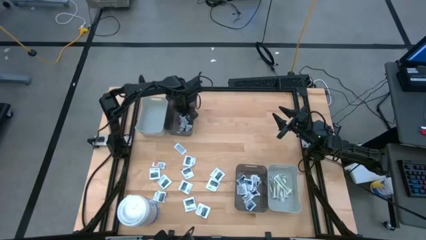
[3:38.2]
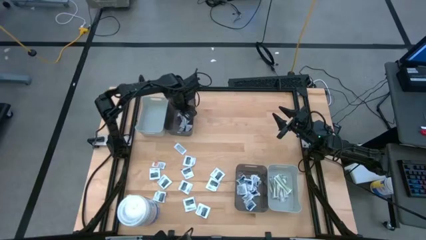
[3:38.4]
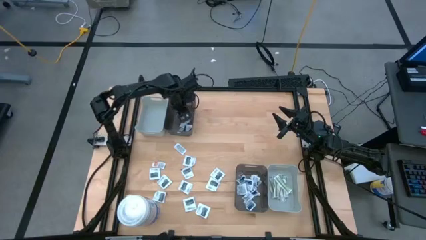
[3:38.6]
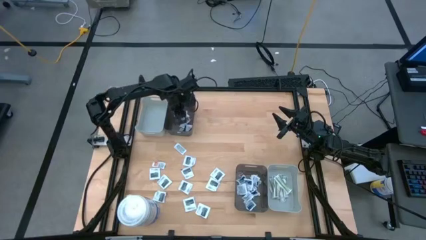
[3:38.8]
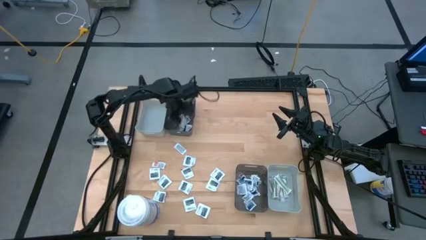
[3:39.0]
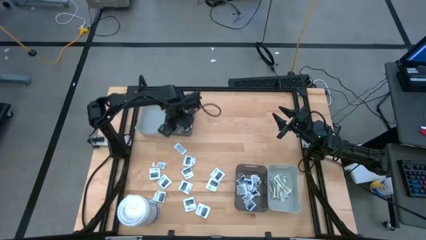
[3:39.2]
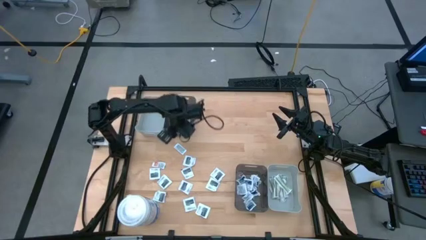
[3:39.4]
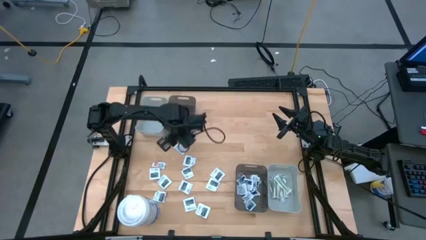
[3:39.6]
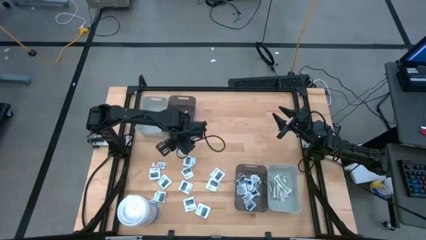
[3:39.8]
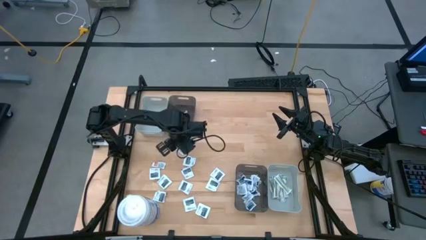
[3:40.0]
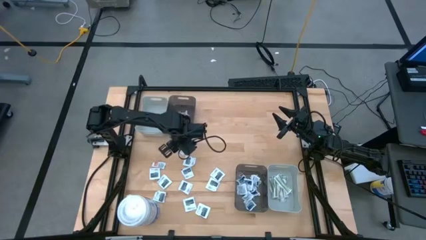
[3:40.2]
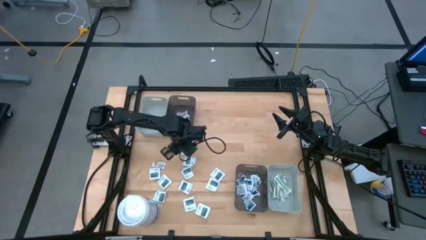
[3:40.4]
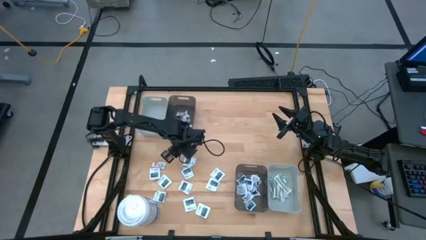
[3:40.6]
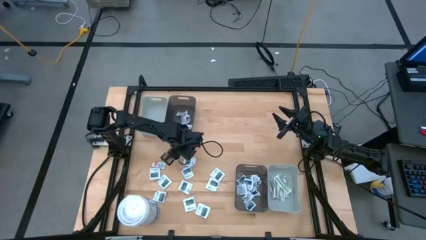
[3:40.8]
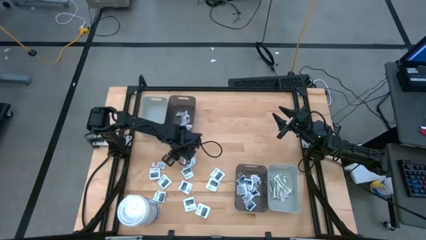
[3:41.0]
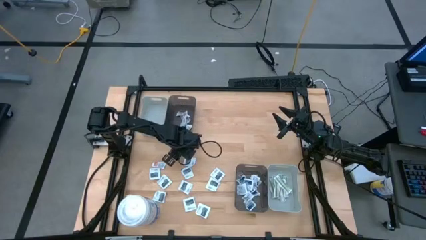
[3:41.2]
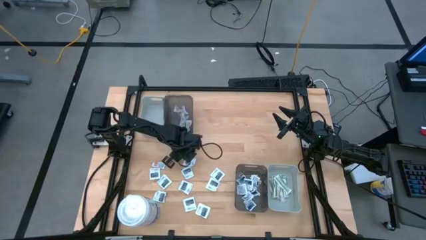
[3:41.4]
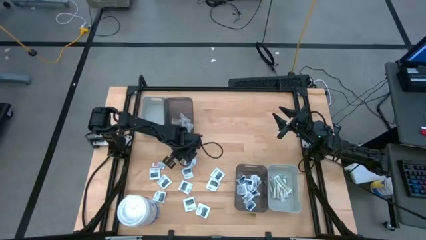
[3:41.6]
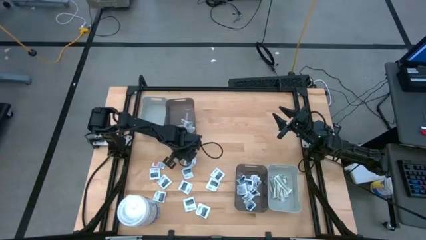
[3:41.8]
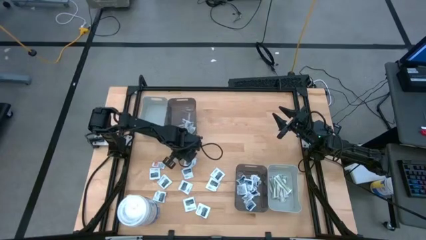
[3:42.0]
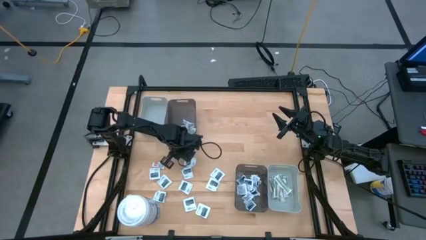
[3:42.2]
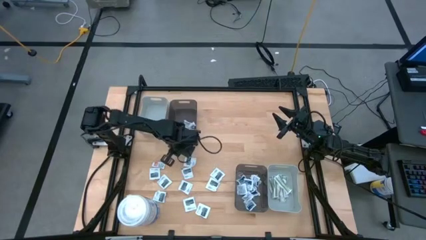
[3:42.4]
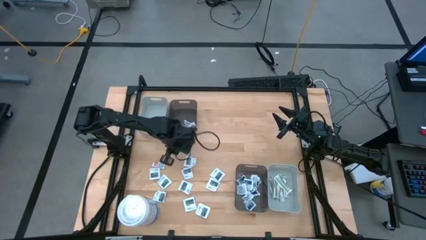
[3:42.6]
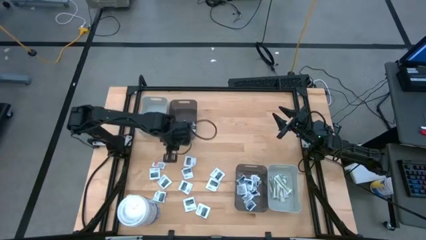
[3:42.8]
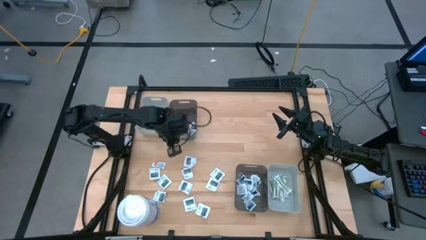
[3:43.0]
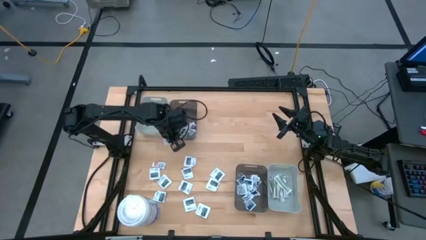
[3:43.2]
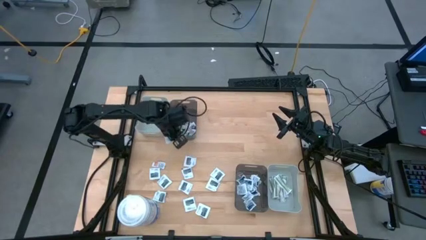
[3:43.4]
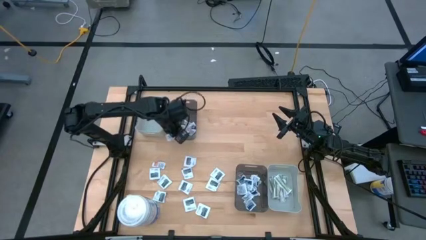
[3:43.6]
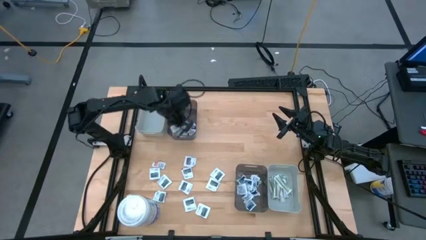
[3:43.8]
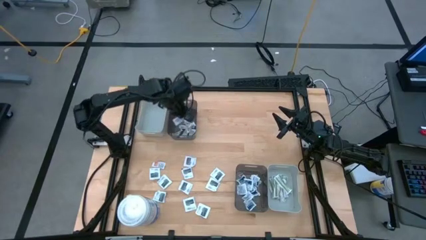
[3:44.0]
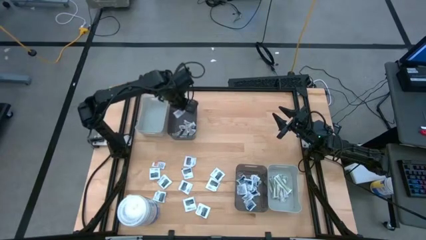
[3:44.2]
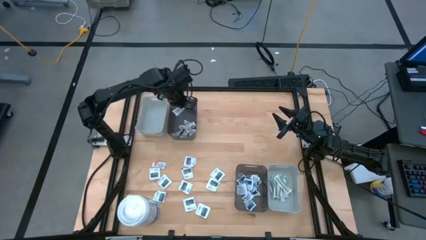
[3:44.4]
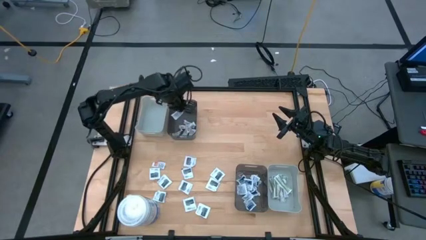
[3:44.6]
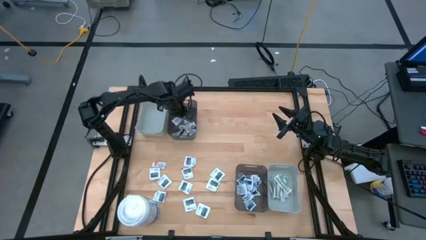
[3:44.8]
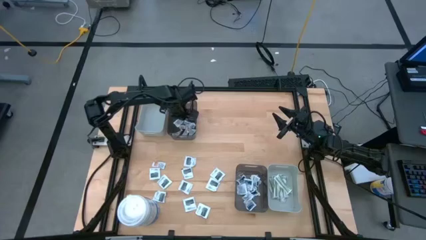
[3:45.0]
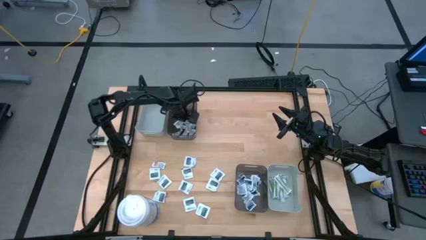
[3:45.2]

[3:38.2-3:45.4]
Task: Pick & Place First Aid Supplies
Put the white ointment pack into the top black bin

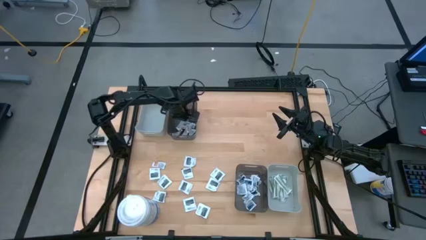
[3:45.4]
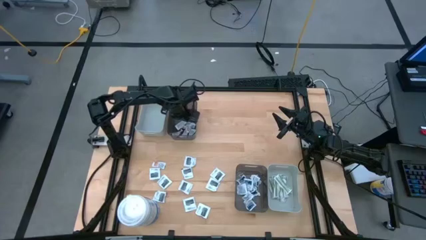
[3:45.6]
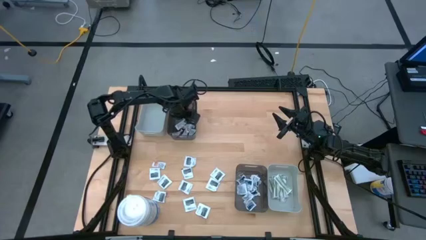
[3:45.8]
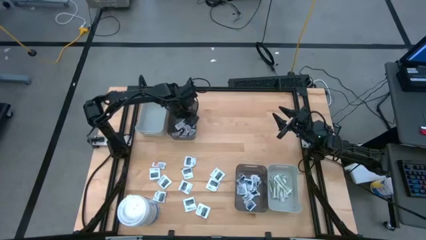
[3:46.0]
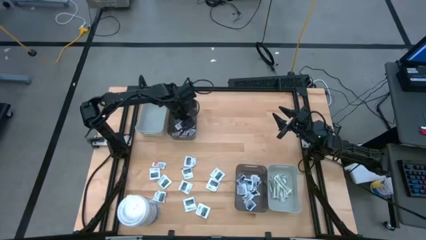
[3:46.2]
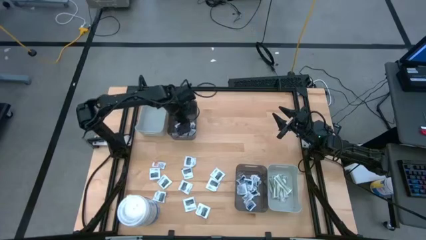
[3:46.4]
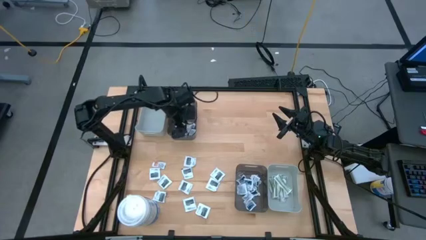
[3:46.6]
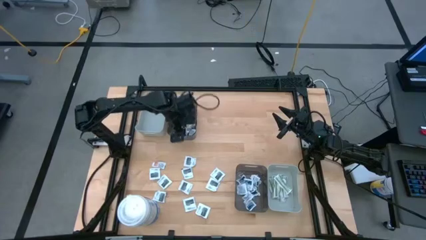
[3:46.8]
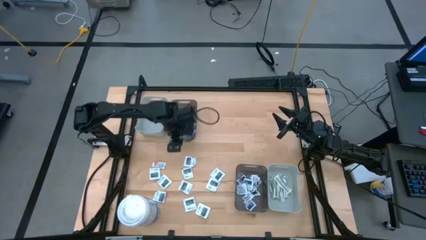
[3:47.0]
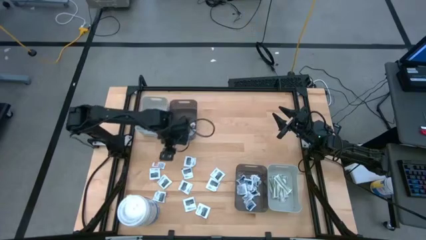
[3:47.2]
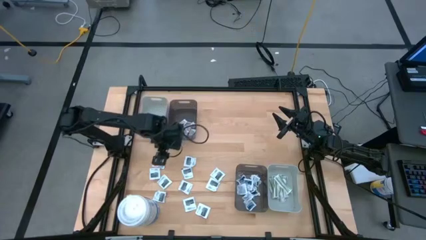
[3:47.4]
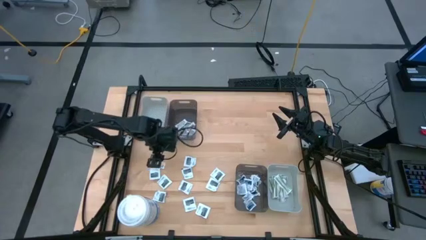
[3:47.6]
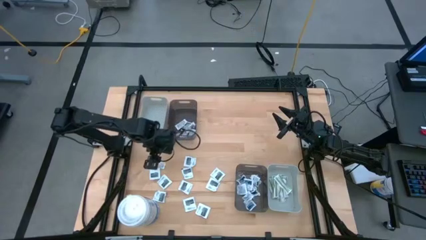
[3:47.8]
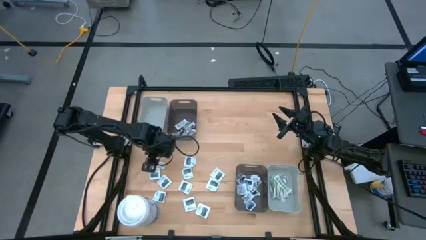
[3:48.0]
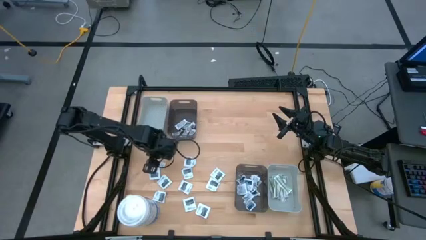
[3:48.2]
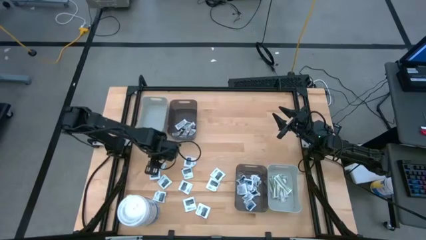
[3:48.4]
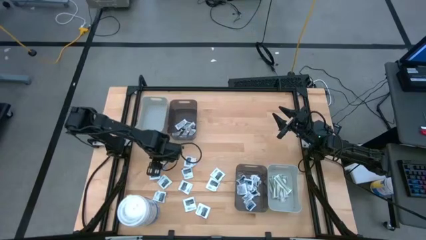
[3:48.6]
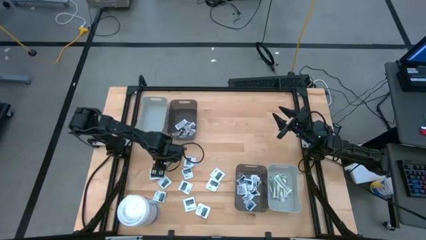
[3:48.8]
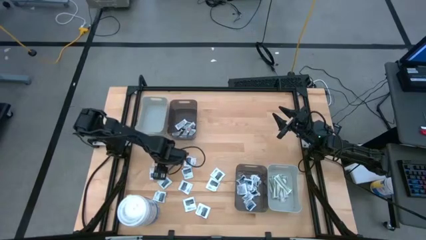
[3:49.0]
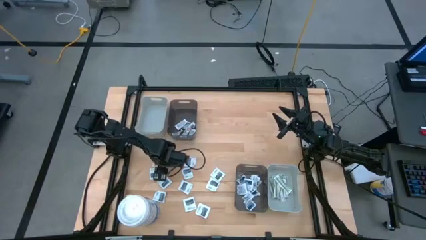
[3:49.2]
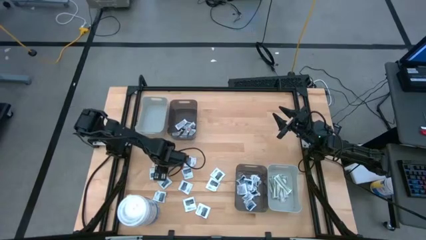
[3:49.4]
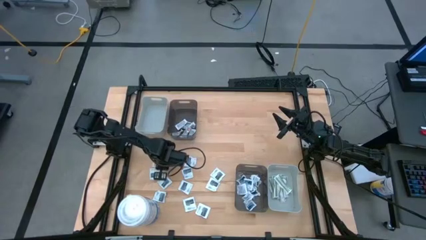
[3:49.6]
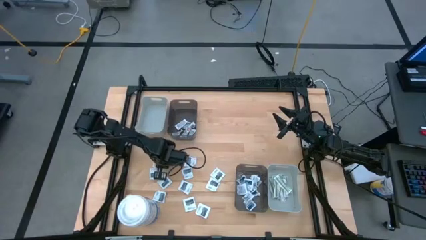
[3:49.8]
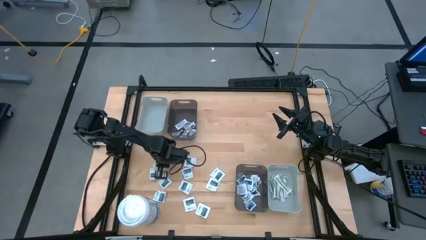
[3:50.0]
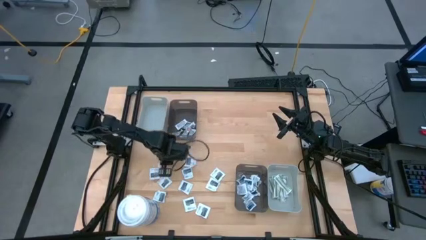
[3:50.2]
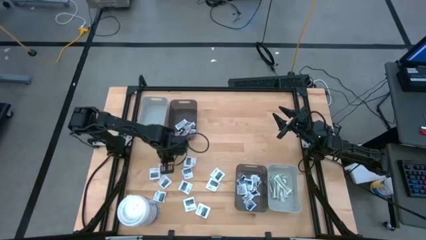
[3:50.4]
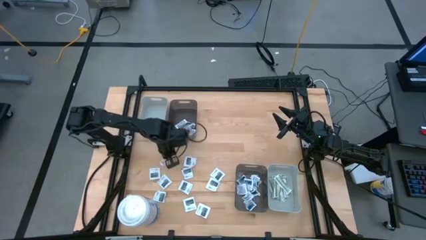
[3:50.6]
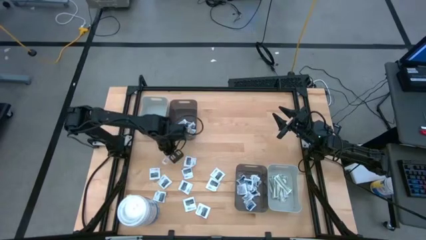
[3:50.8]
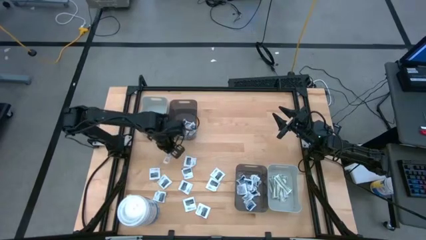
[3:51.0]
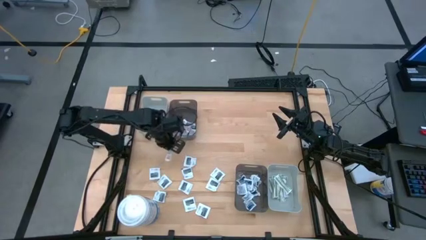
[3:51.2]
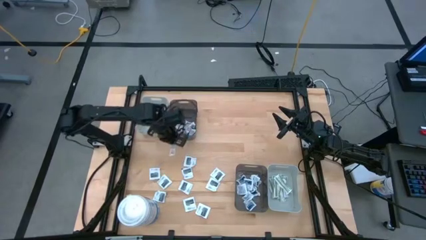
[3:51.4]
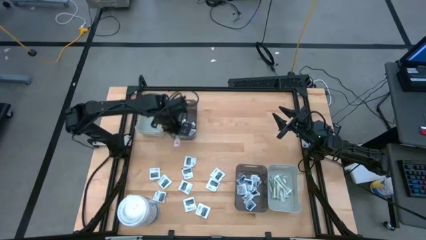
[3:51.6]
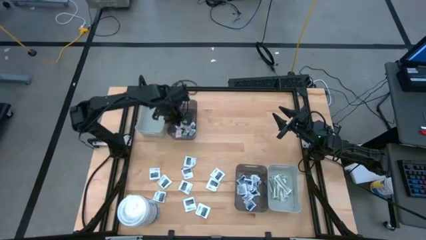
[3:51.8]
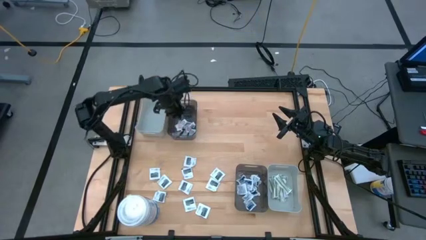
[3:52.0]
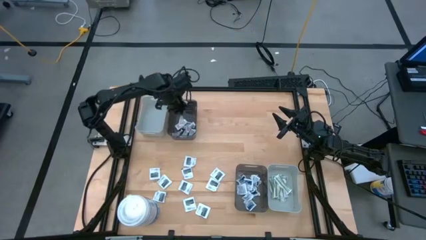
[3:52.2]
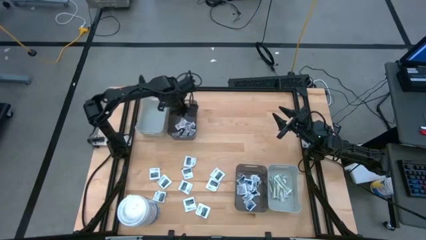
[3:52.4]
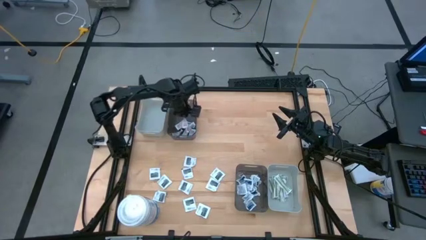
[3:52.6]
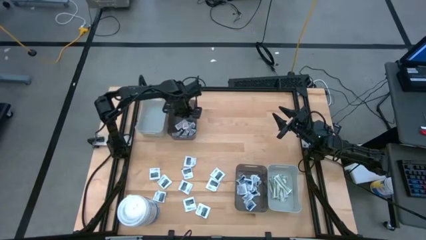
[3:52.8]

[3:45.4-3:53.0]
Put the white ointment pack into the top black bin
